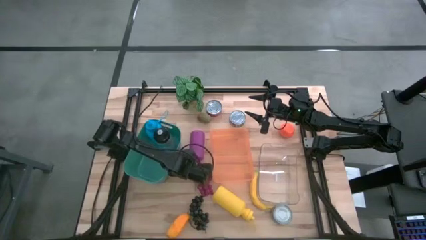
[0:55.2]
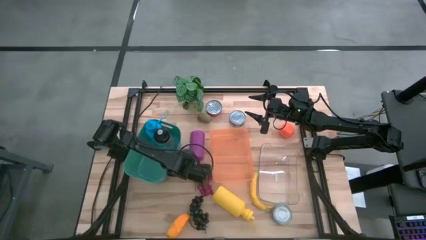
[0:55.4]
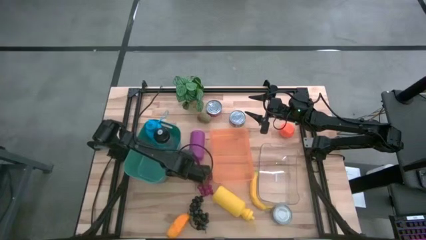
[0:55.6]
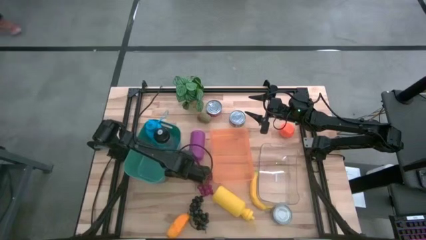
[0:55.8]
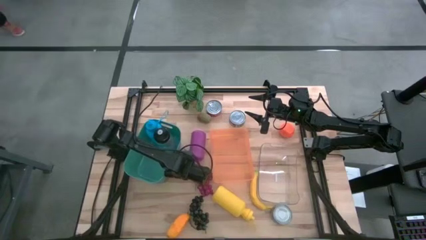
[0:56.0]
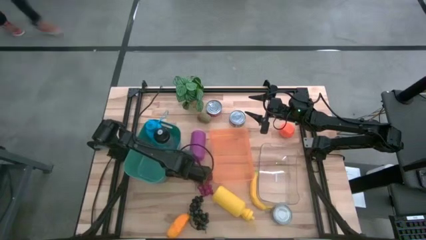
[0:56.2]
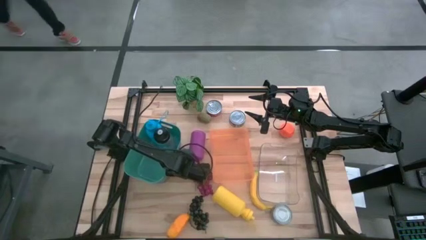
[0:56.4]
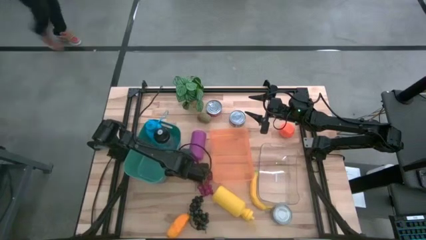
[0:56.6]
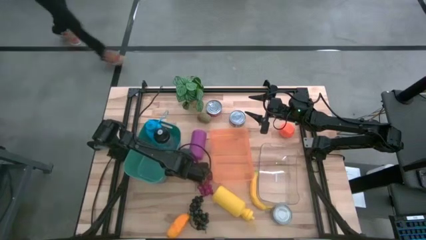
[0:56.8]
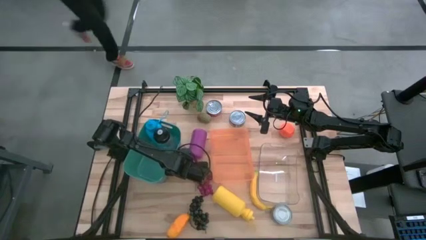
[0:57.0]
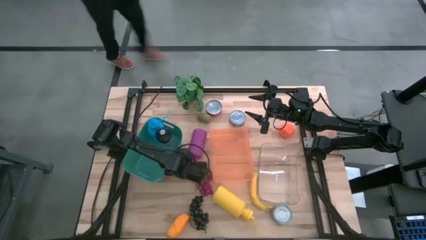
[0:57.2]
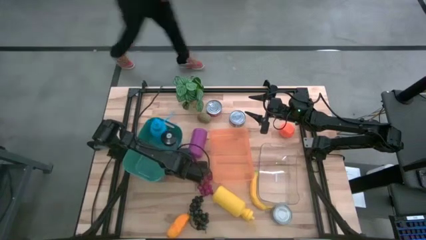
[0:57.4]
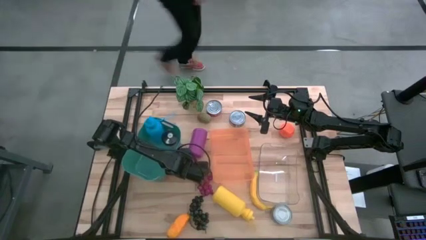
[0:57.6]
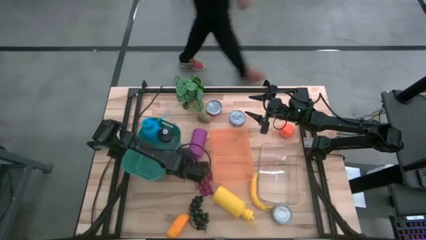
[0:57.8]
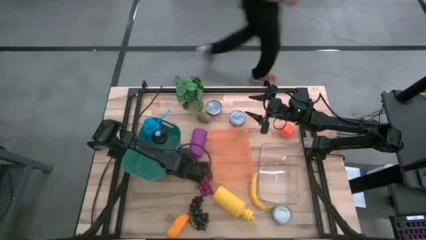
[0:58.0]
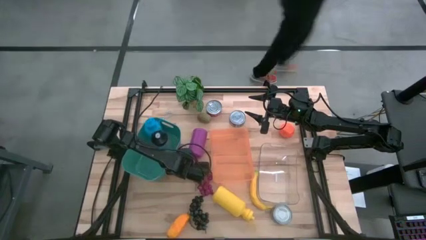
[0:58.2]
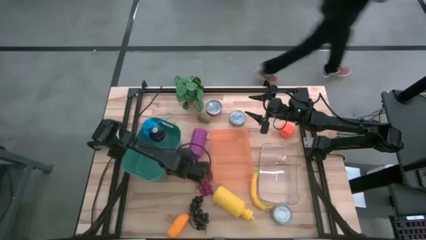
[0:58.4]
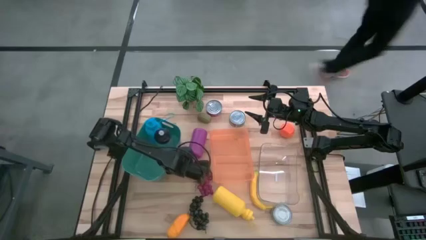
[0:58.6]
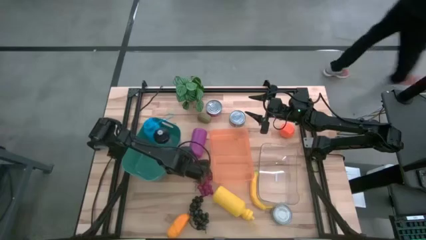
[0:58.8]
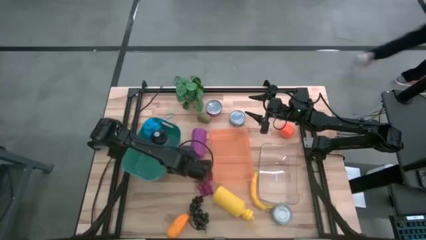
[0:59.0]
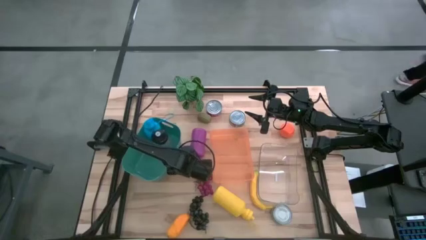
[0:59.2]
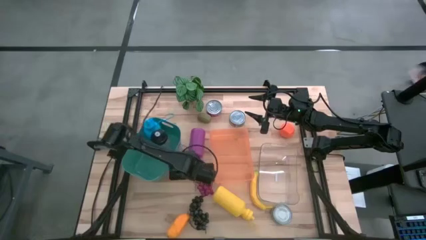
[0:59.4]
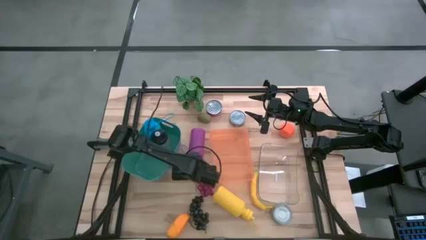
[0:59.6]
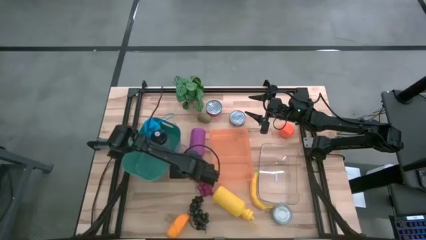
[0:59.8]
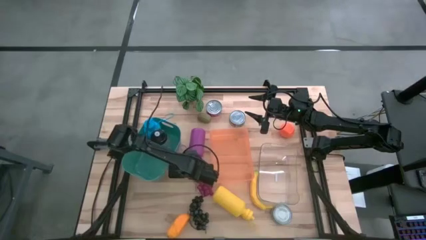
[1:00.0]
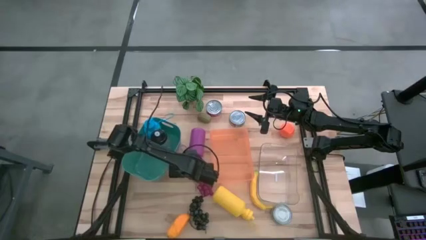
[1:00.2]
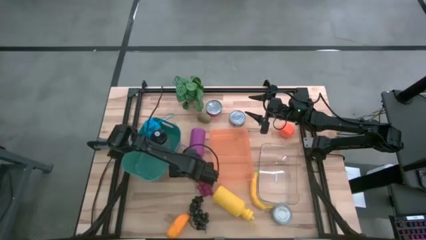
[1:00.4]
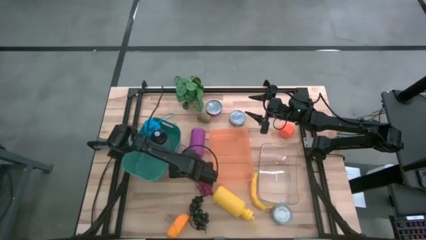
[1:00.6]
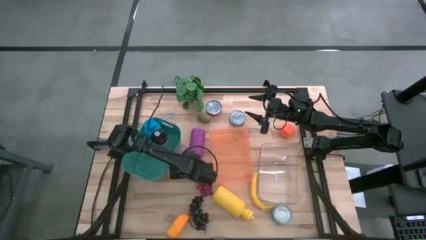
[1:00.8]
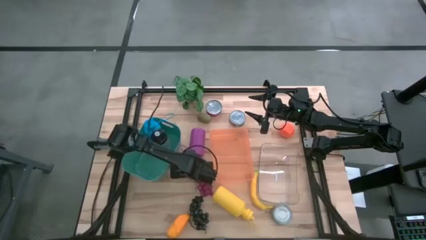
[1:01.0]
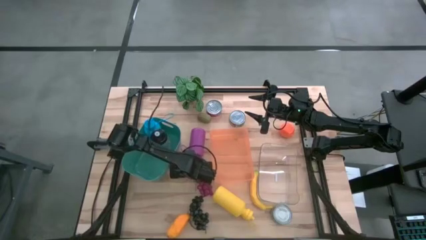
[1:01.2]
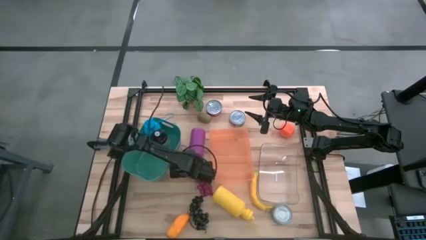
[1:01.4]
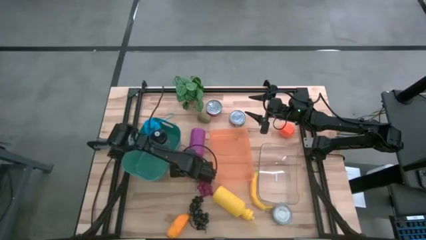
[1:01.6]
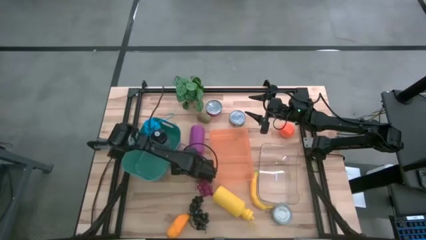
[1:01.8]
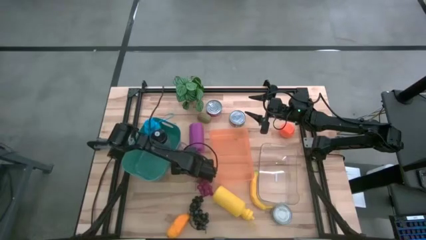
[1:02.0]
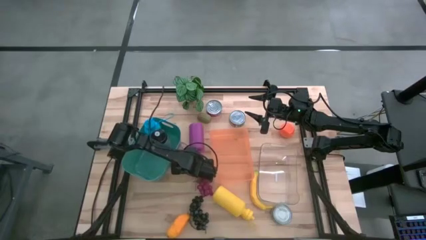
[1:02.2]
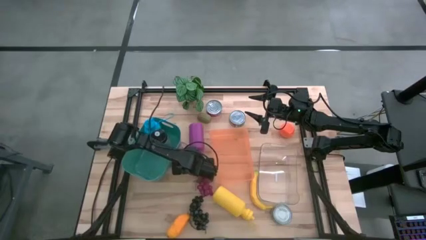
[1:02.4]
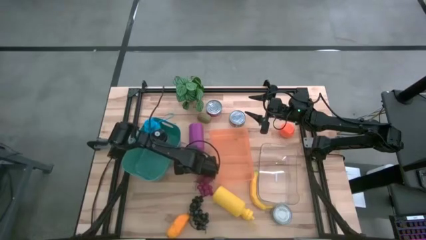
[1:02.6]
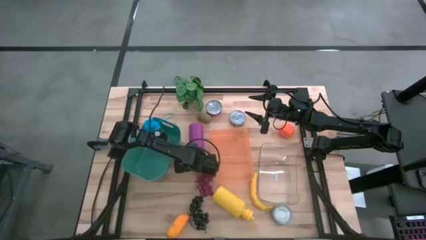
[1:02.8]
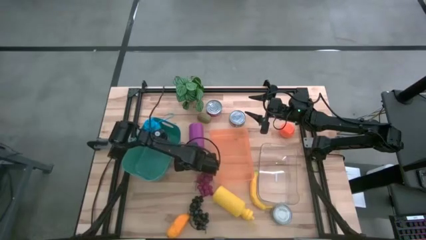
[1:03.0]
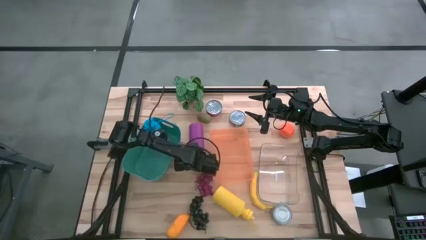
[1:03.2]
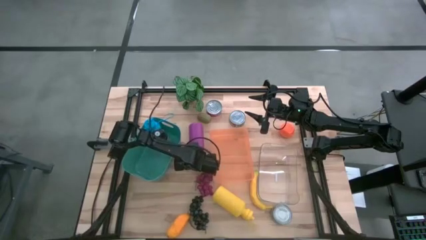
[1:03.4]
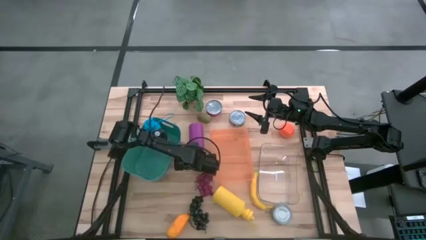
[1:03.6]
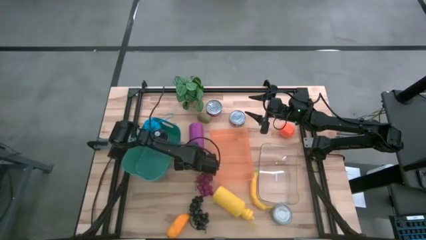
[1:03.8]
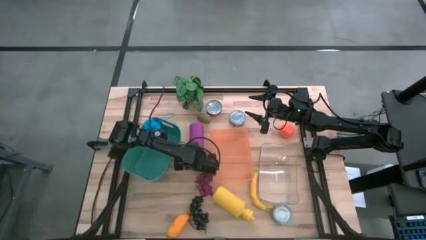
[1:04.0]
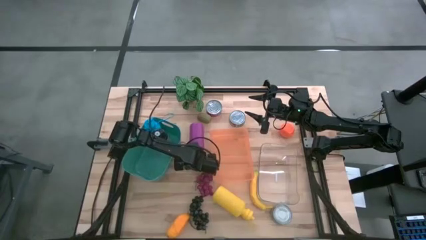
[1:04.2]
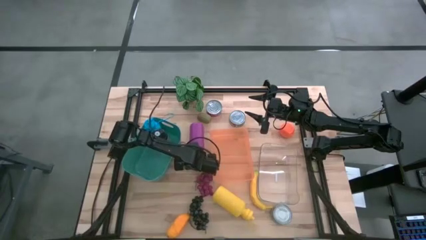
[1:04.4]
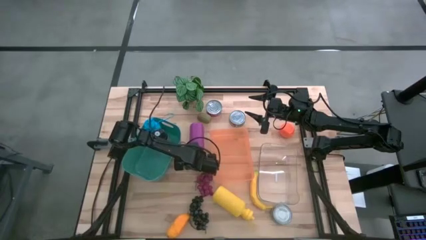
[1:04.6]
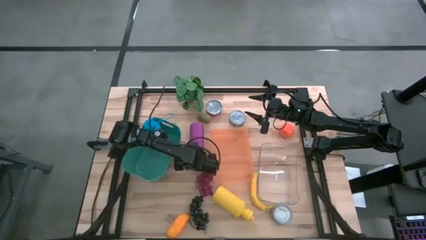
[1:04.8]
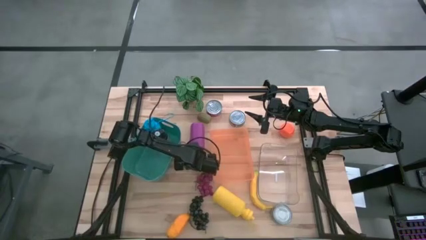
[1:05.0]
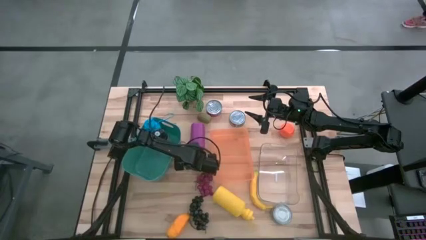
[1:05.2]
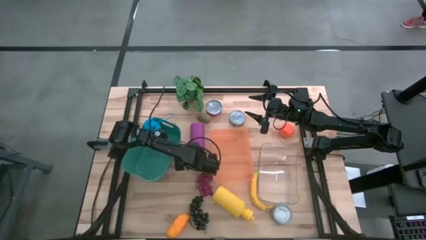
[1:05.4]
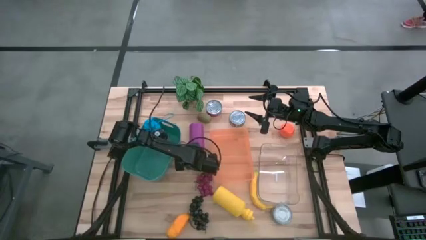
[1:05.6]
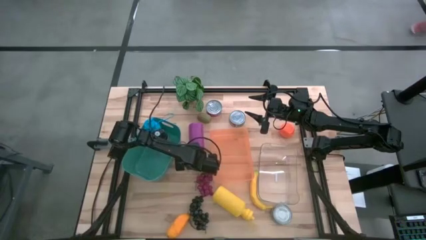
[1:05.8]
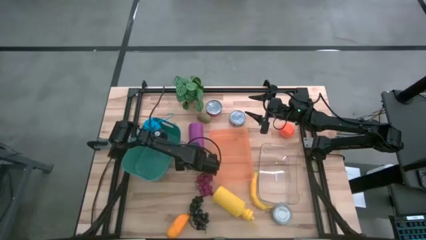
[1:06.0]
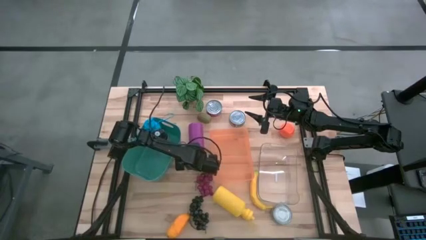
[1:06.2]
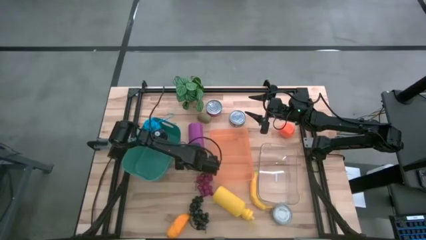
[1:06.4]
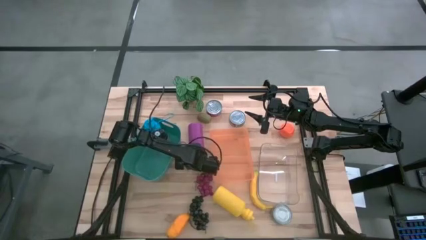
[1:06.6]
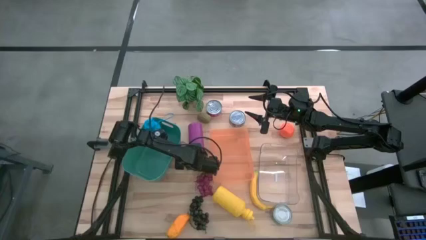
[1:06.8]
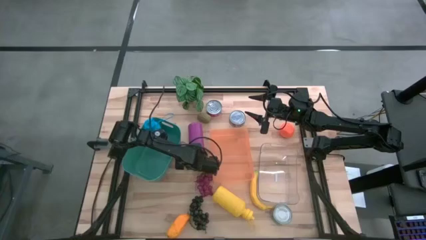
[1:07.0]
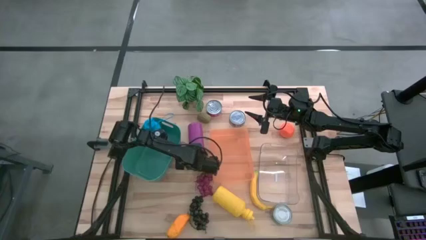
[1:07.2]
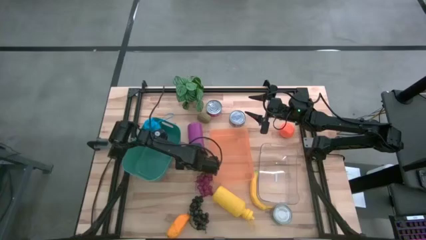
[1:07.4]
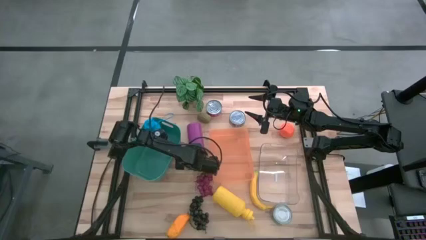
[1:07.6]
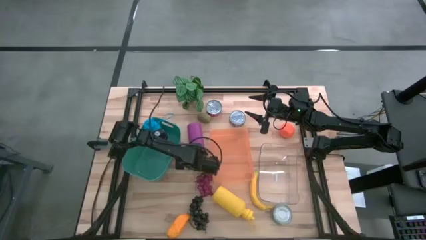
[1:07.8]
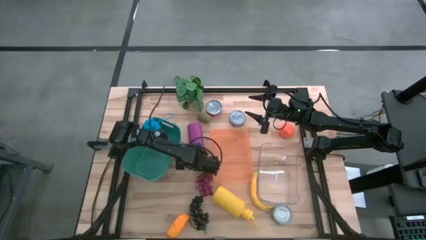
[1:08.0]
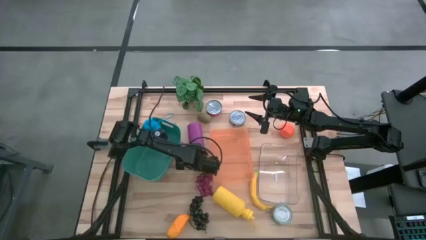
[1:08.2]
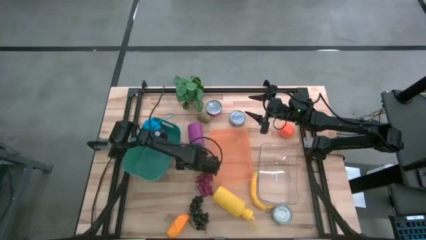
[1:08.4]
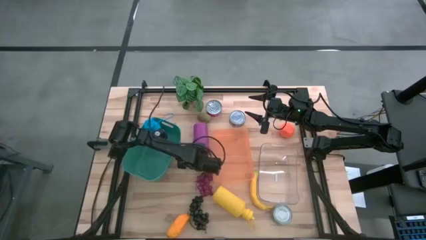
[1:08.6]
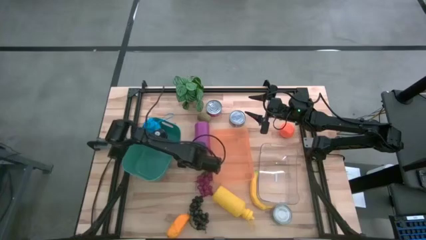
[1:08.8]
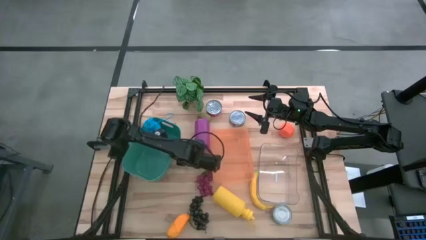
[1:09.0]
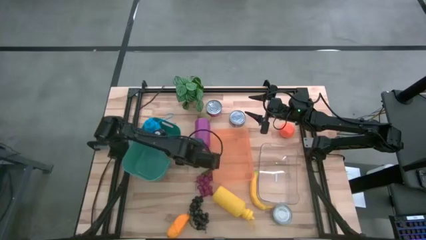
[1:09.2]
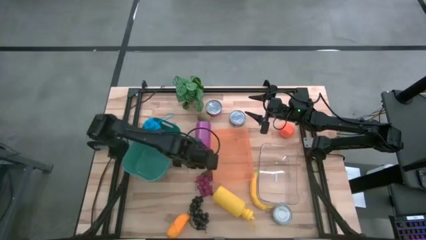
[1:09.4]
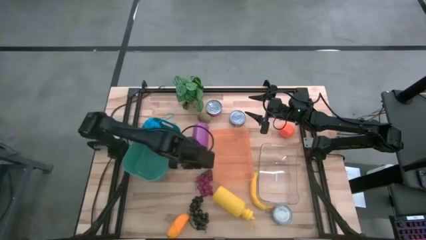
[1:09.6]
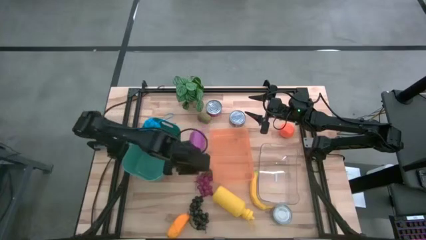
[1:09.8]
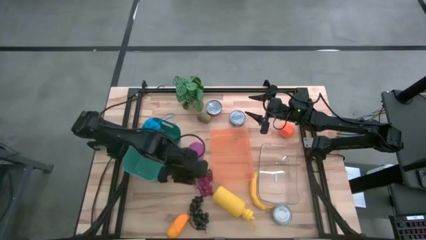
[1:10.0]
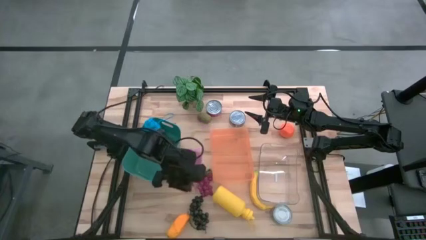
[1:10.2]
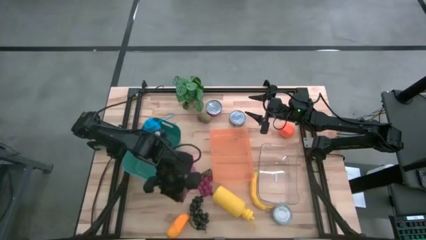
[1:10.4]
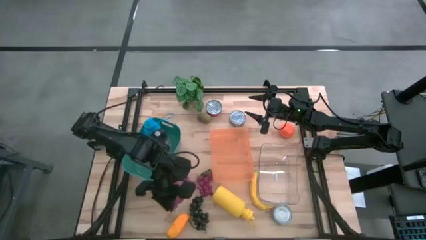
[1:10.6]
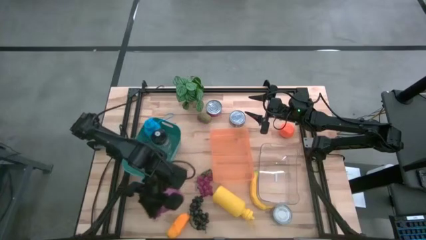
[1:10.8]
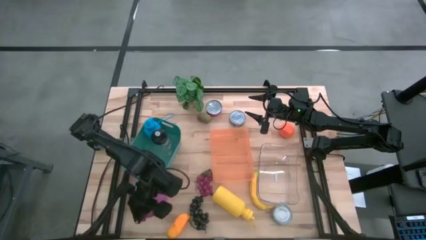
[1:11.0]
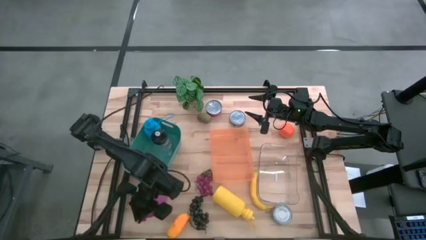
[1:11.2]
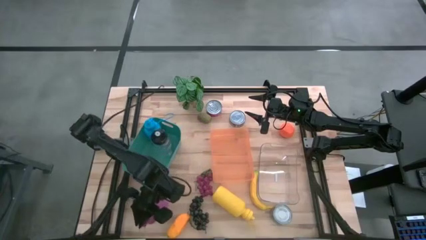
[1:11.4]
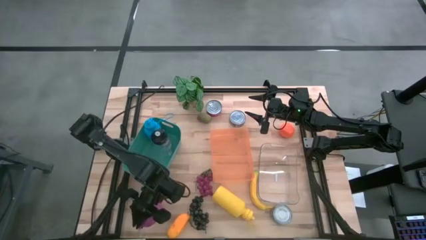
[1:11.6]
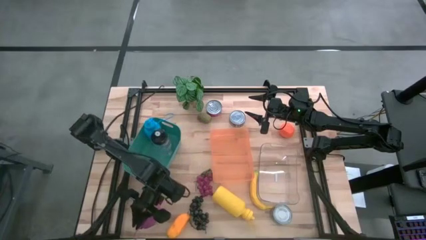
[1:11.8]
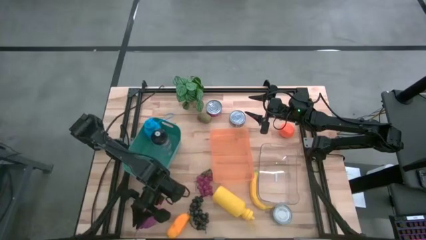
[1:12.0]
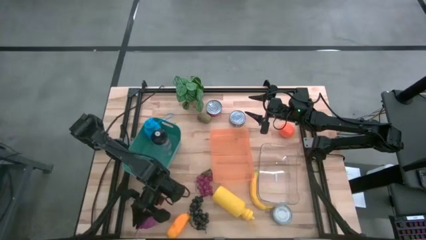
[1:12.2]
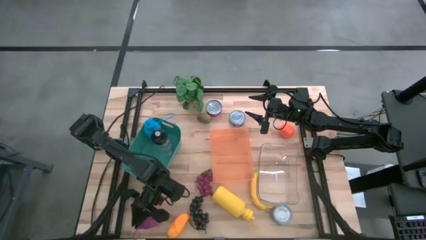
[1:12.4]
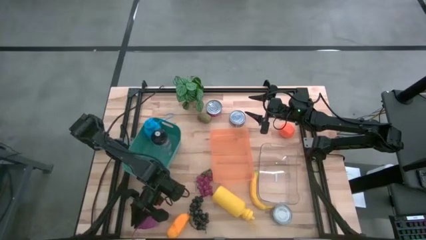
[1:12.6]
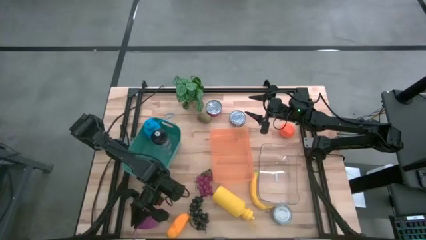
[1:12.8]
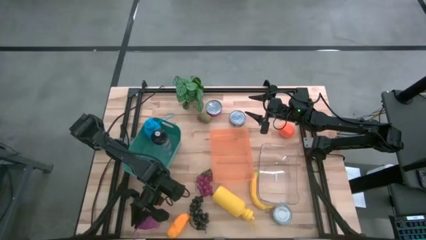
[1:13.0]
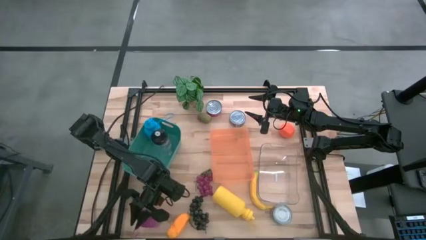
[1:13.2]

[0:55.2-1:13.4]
Task: Pick & Place Food Item
Put the violet water bottle into the green bin
